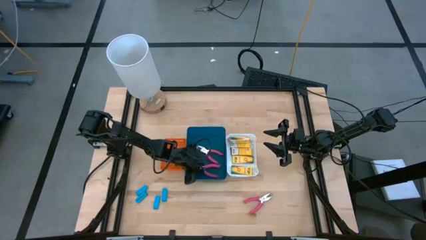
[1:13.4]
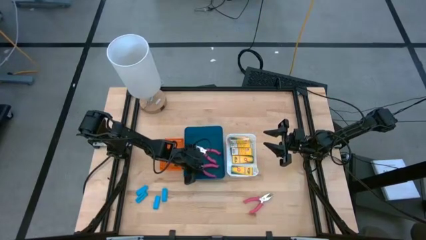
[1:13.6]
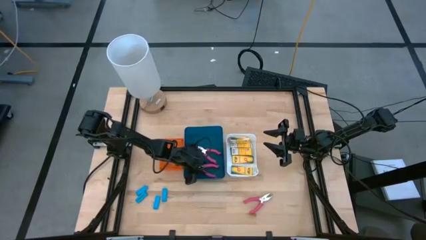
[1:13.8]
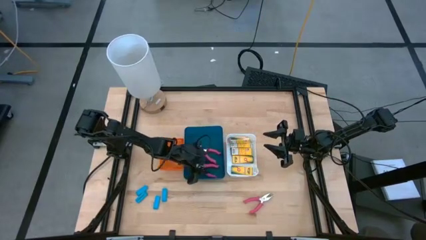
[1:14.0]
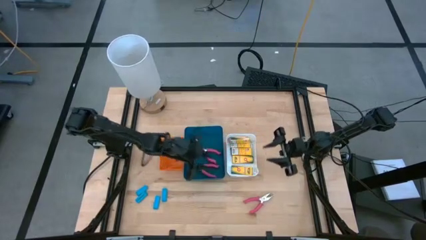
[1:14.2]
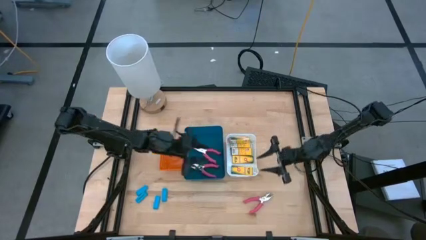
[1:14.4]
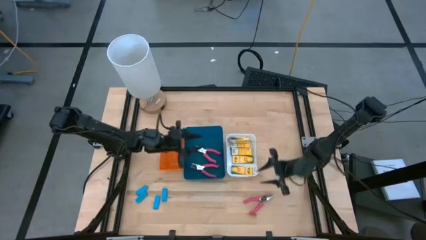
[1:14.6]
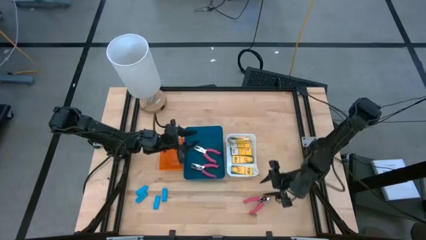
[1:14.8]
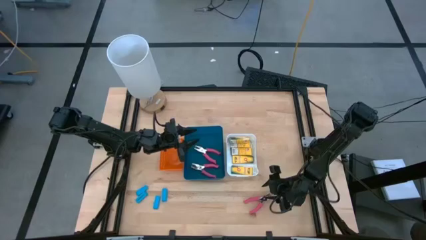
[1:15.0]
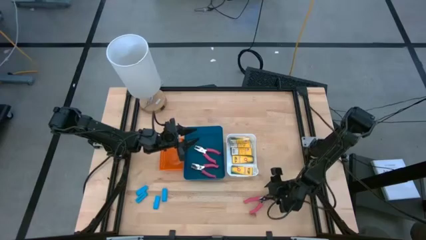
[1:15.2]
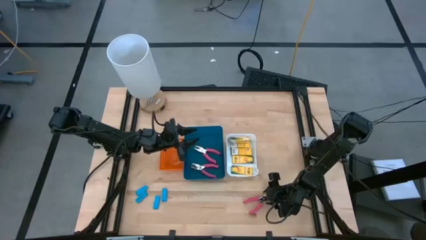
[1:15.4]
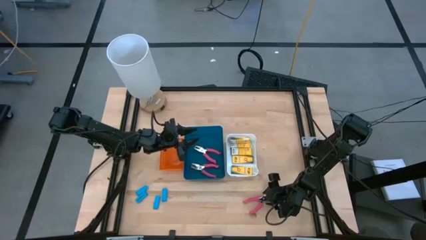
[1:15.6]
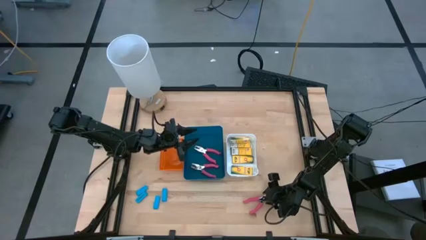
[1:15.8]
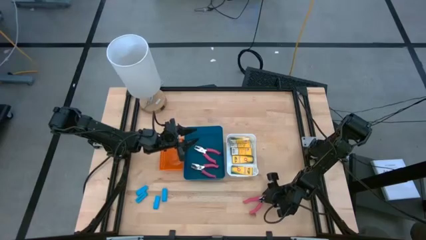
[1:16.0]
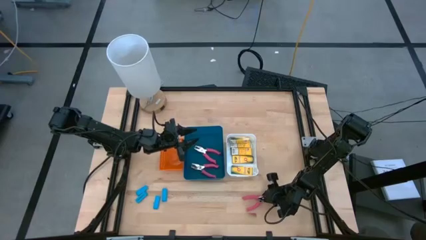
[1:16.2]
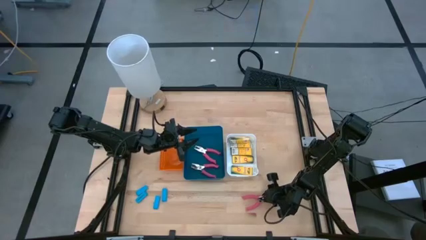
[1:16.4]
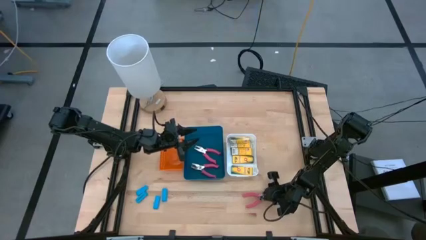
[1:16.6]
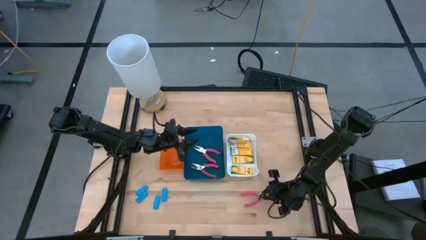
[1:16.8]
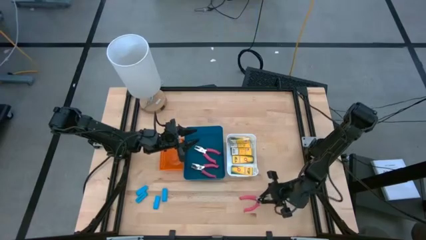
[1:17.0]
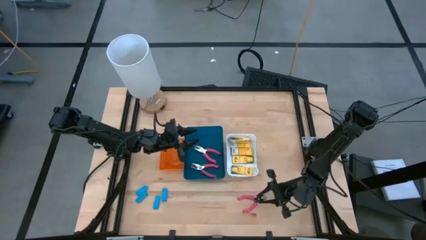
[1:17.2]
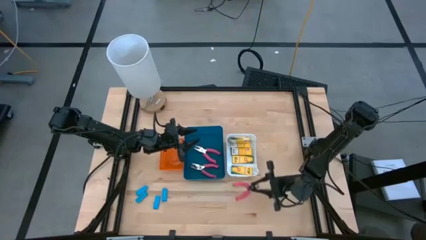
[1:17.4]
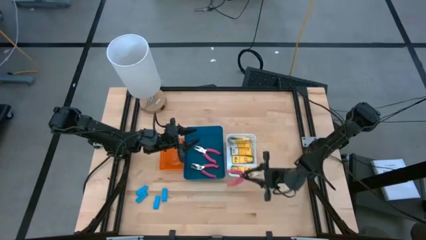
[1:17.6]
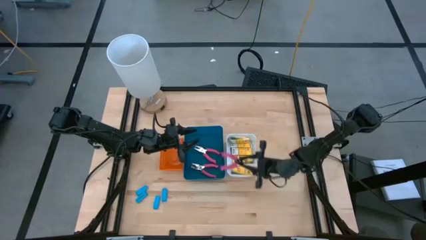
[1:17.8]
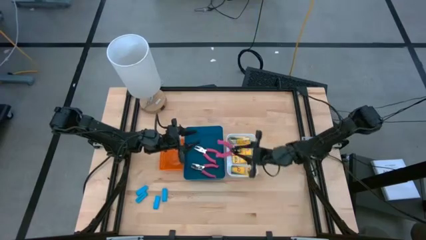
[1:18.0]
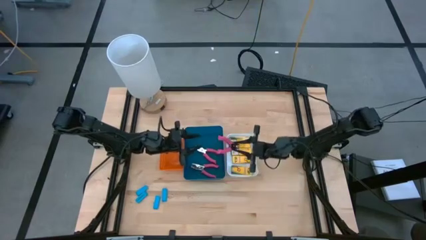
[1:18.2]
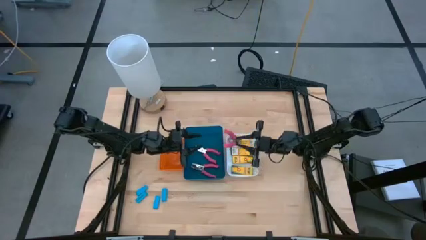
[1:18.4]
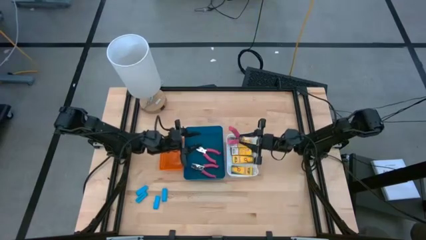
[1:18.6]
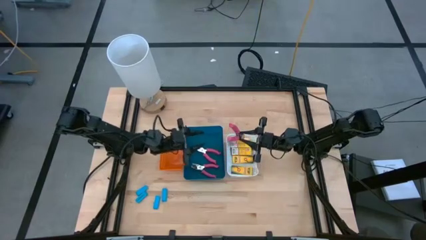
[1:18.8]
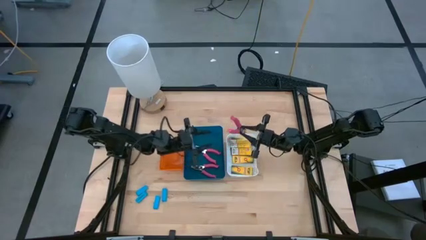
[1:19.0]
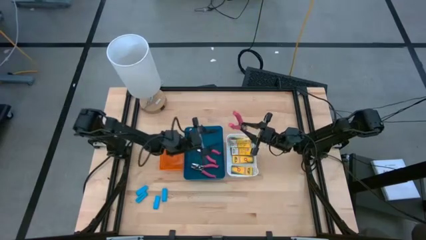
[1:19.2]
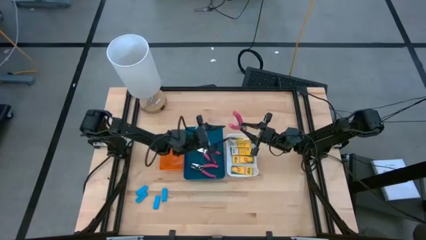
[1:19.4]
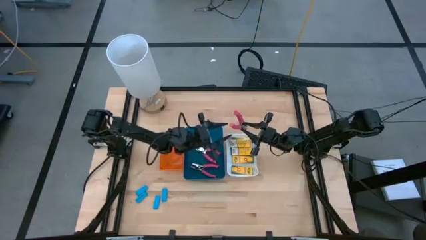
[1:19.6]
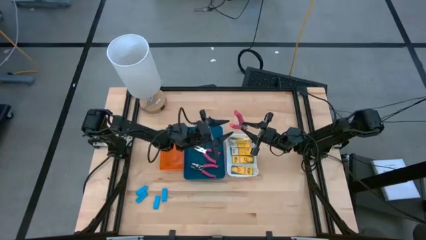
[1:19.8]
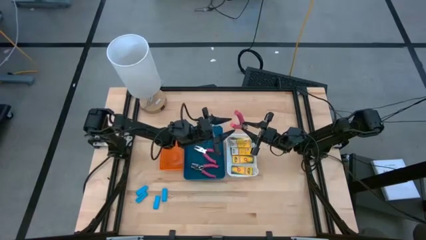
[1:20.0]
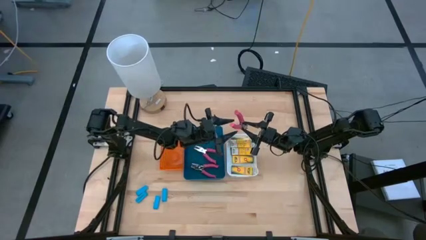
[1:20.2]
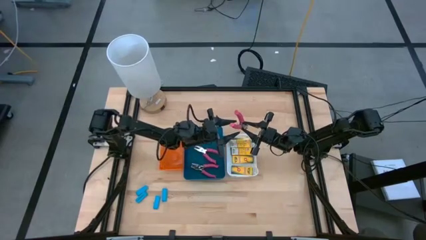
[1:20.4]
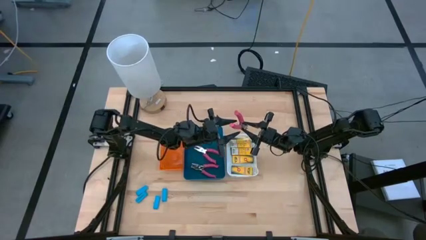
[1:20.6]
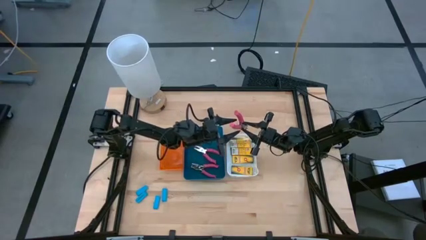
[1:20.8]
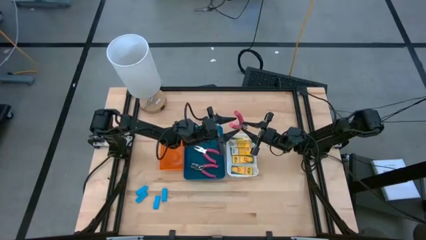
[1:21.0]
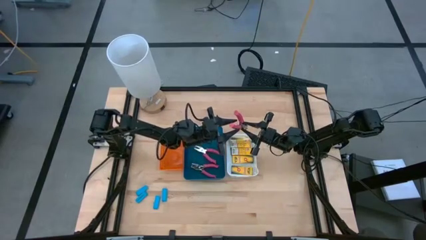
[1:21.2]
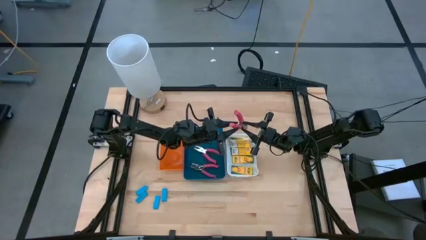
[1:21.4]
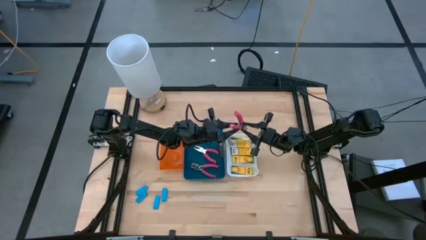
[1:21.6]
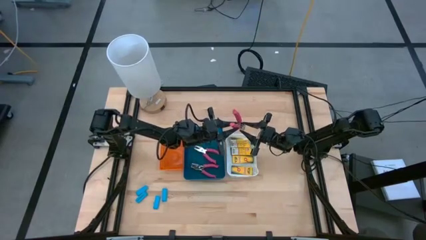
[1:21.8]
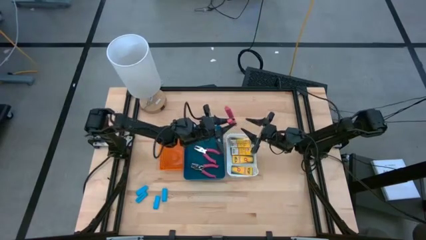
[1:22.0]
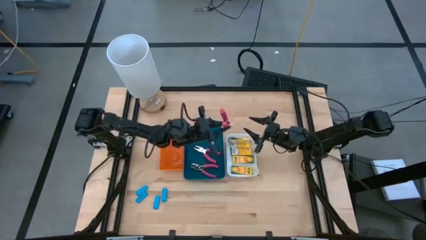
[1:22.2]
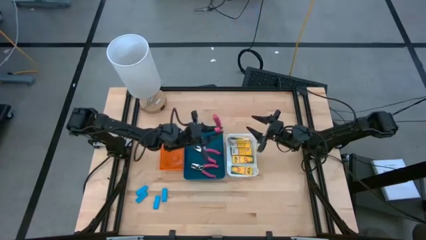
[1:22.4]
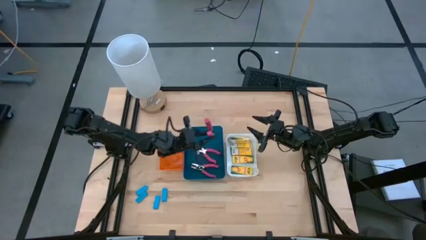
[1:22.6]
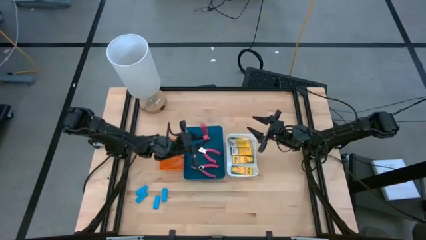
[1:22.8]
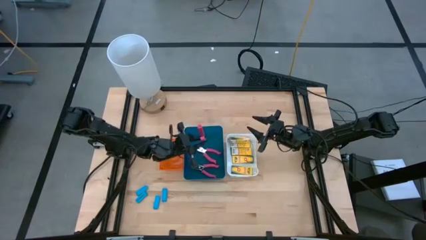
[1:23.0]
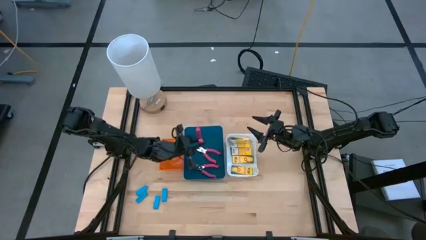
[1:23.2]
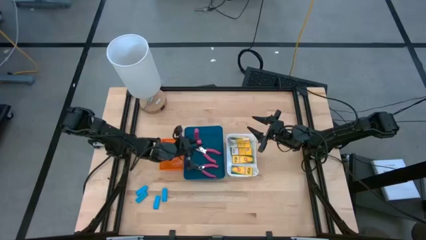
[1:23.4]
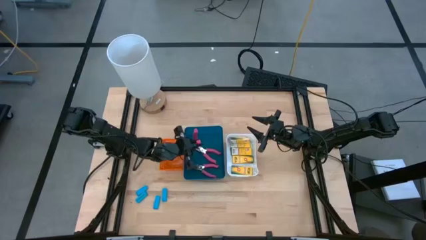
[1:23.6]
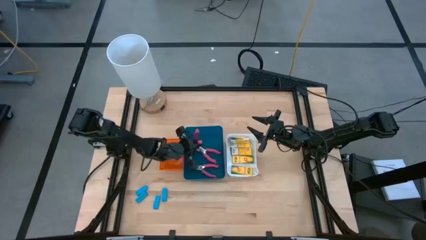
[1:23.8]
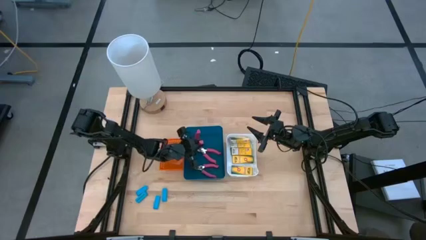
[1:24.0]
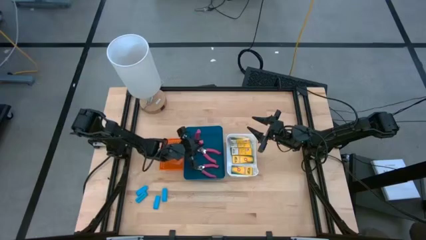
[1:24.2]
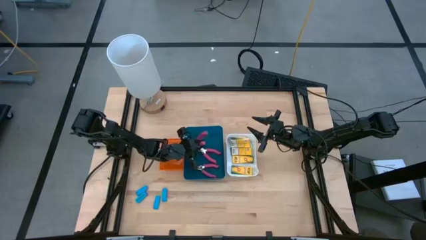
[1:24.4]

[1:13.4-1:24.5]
Task: Pick & Place School Supplies
Put the pink hole puncher into the blue bin

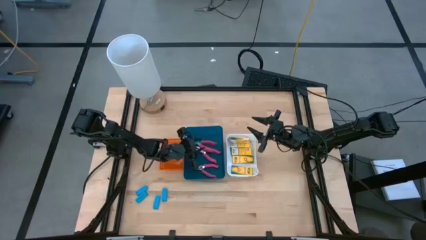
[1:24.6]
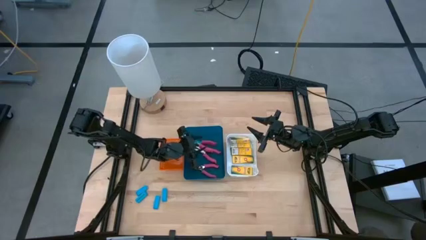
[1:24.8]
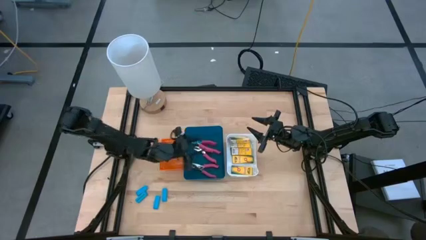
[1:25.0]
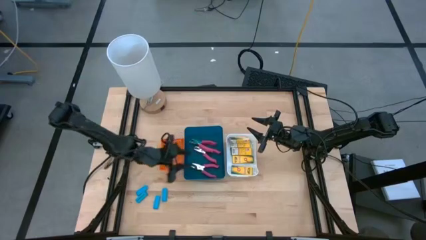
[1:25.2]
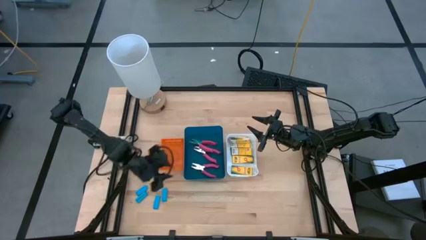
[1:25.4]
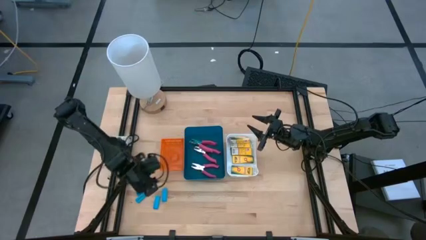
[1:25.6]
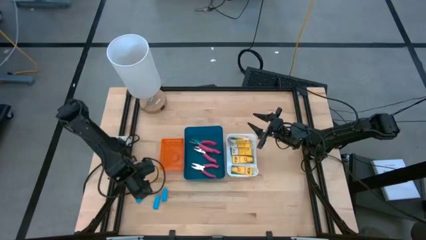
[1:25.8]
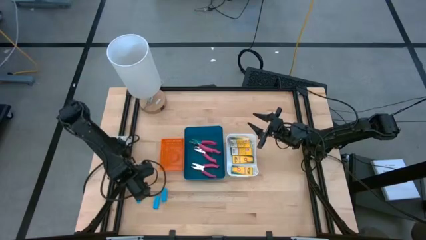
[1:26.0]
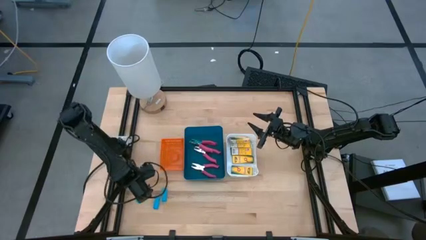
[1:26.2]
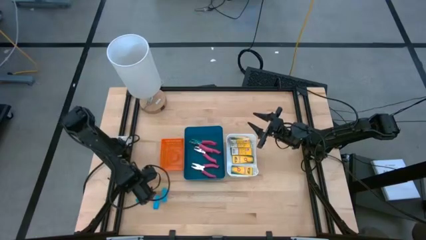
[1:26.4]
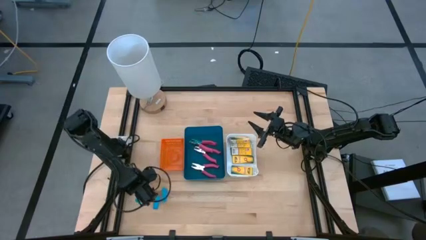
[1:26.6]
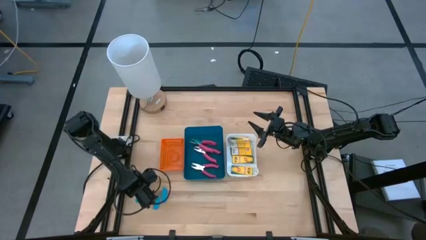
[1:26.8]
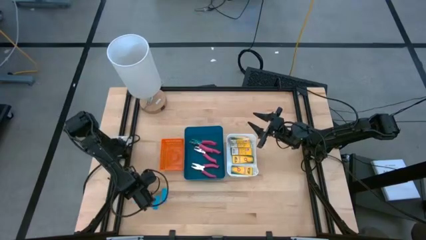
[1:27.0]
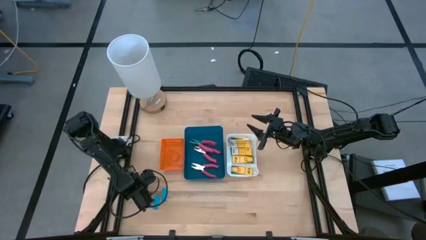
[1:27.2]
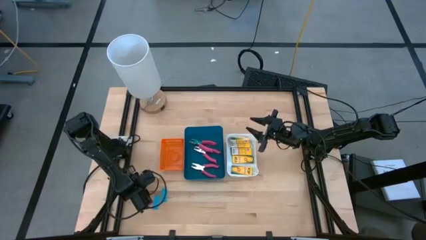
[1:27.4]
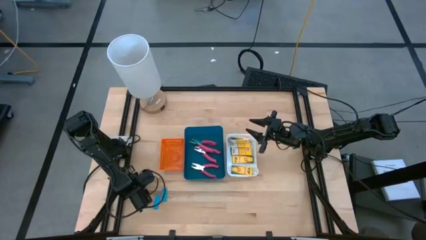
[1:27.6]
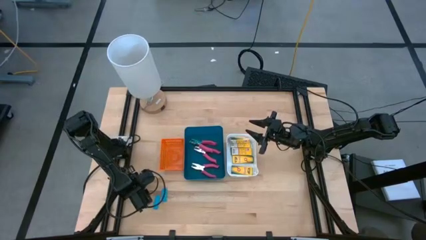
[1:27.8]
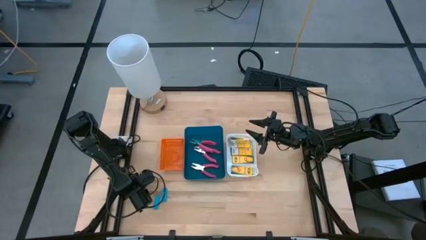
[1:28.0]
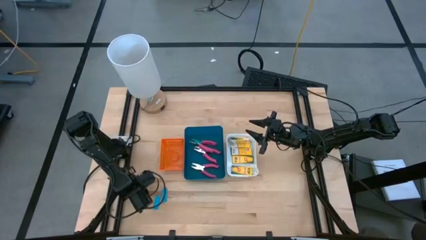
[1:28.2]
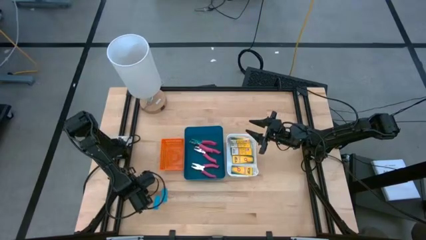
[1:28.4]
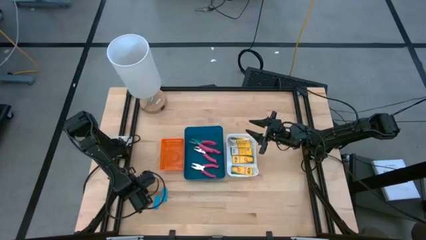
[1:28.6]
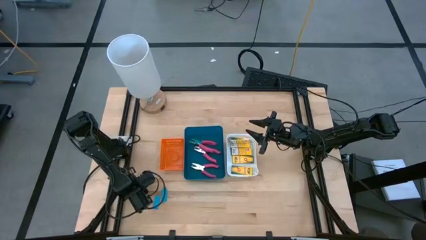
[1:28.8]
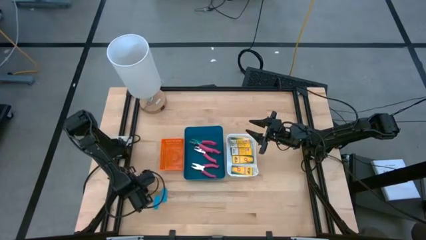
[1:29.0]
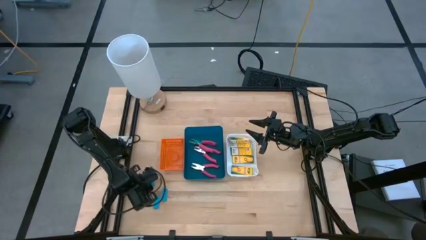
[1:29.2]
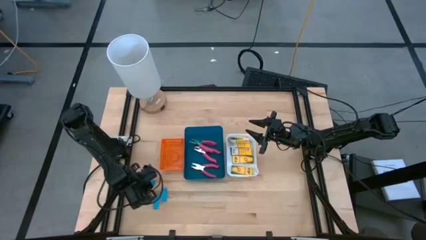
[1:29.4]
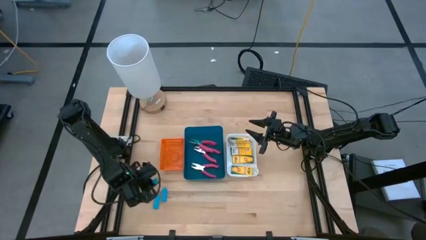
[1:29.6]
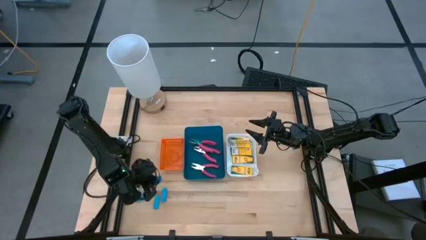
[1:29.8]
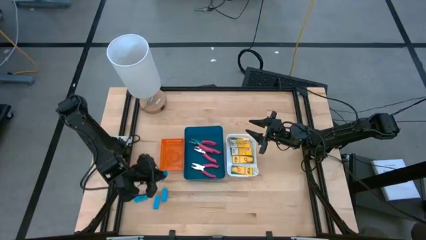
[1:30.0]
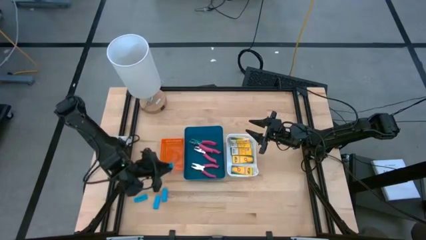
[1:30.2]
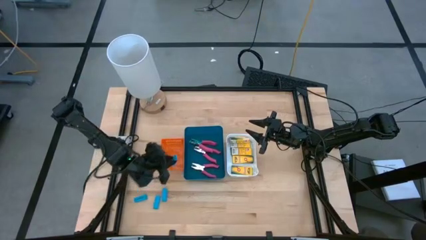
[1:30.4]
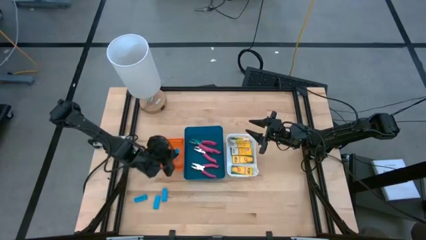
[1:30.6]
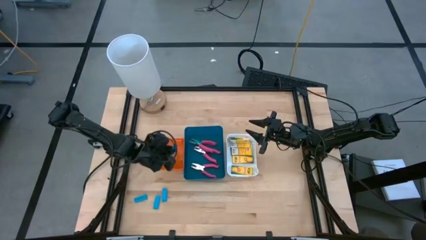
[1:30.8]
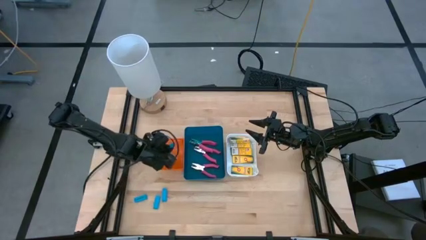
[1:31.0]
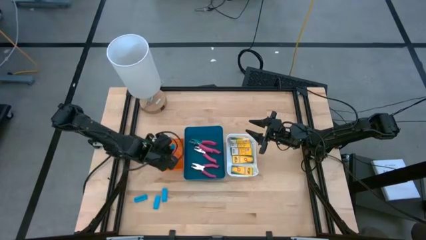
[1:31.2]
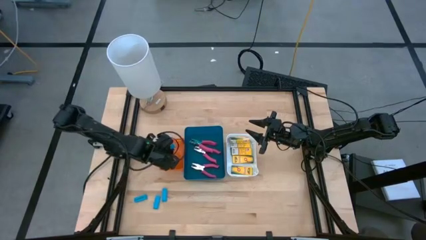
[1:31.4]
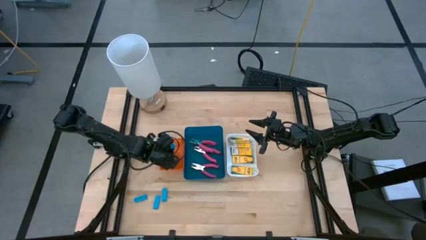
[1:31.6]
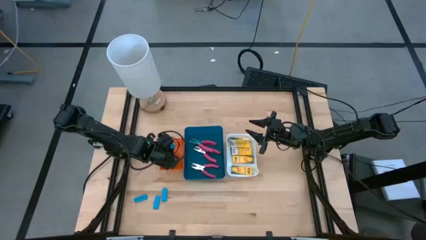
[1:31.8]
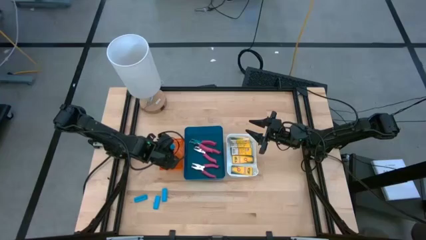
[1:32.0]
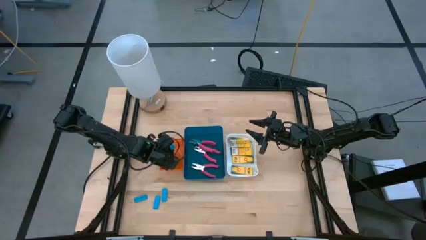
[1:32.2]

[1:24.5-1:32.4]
Put the blue eraser into the orange bin
